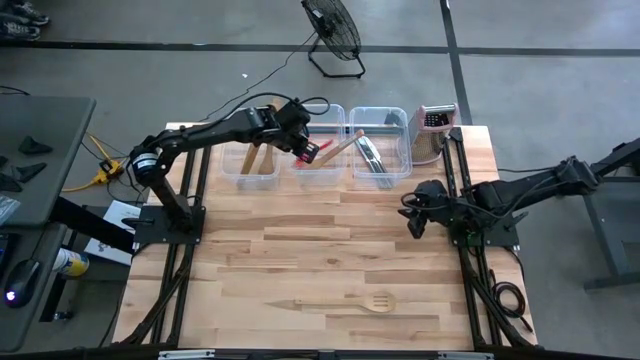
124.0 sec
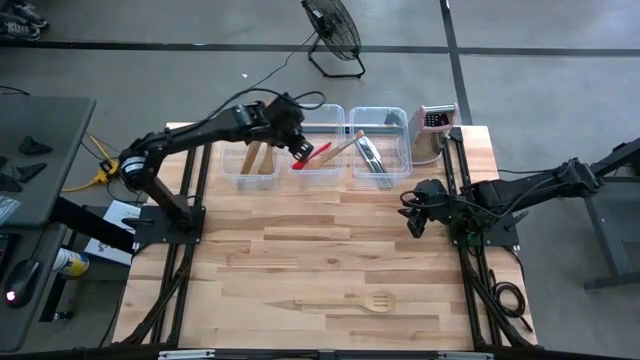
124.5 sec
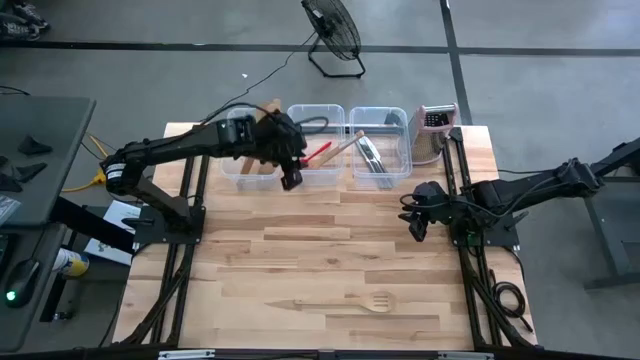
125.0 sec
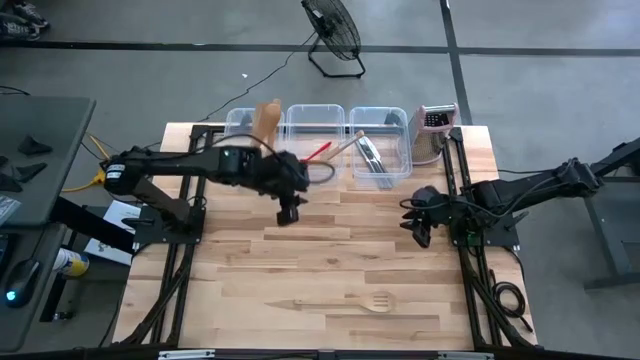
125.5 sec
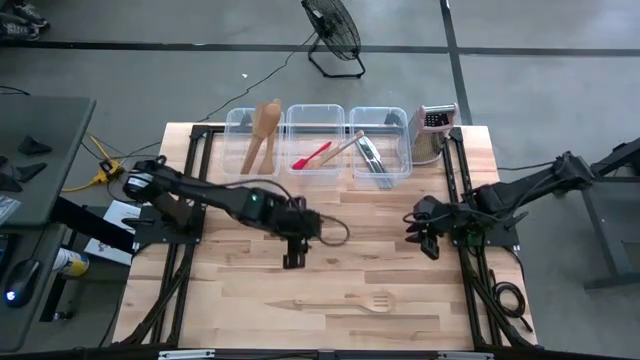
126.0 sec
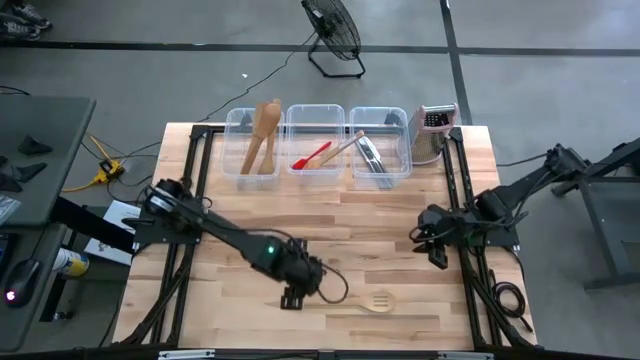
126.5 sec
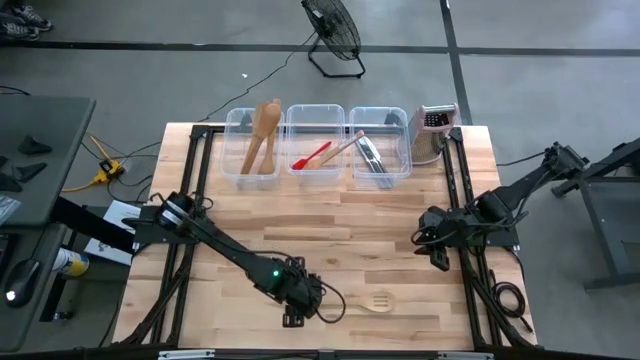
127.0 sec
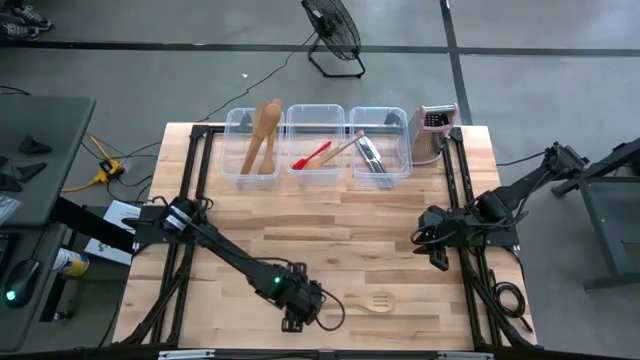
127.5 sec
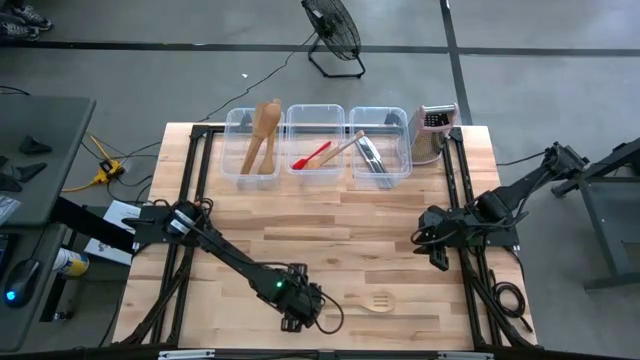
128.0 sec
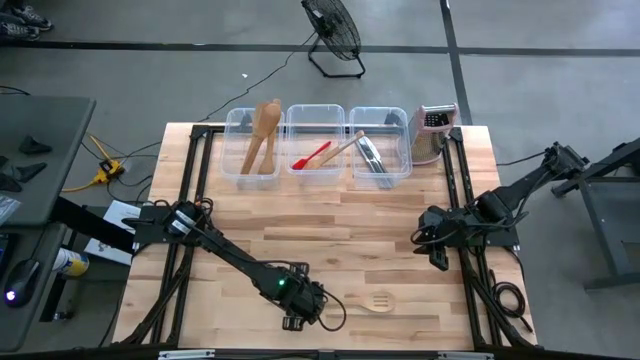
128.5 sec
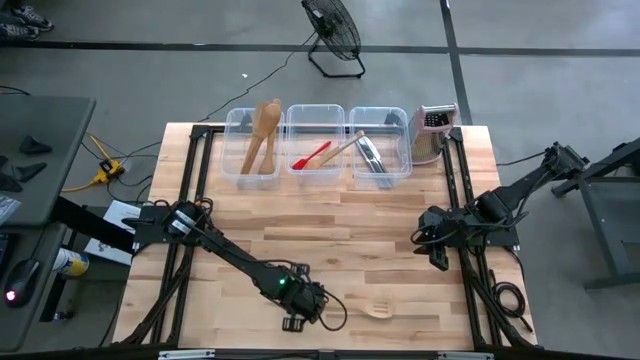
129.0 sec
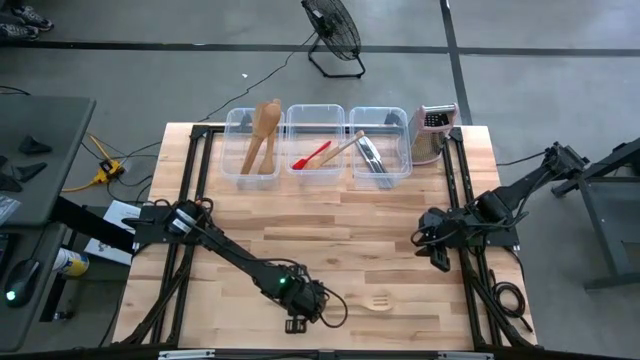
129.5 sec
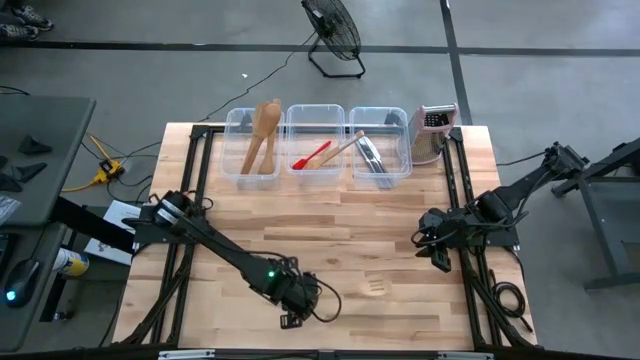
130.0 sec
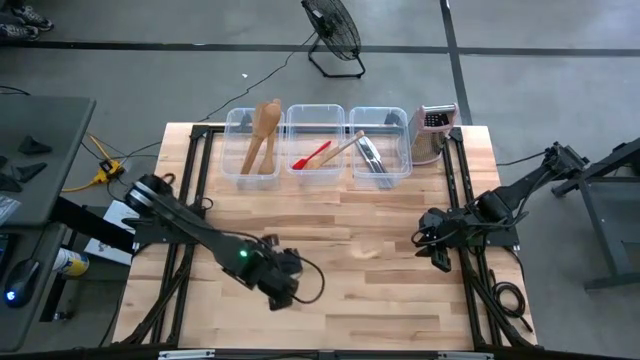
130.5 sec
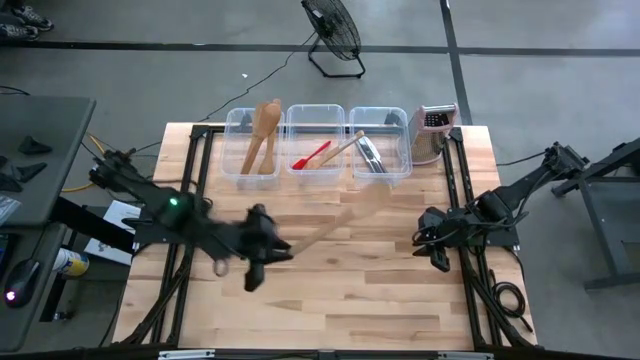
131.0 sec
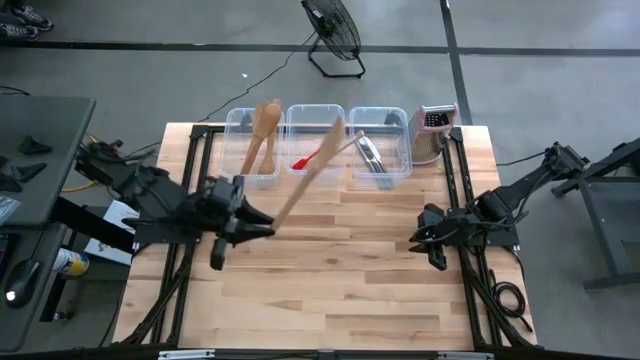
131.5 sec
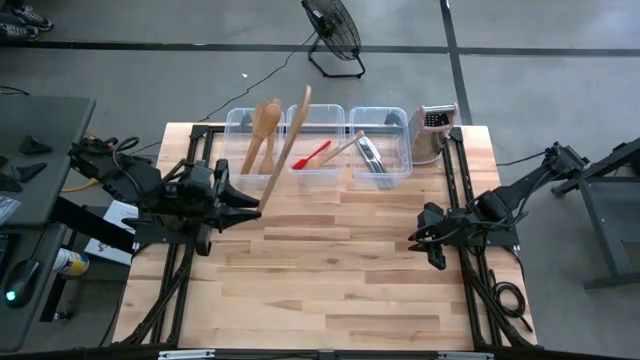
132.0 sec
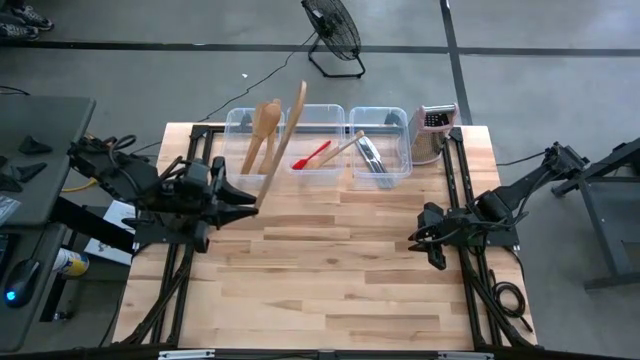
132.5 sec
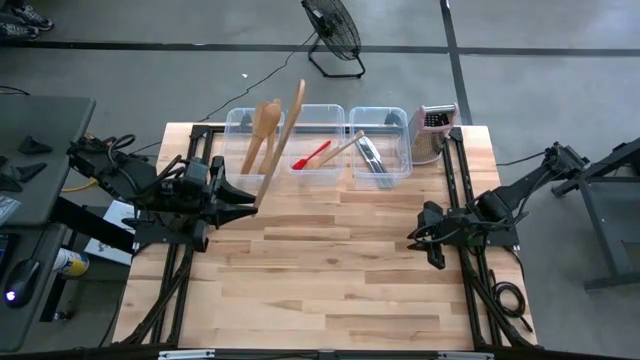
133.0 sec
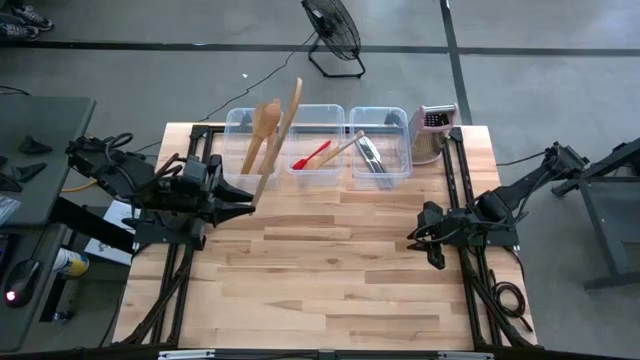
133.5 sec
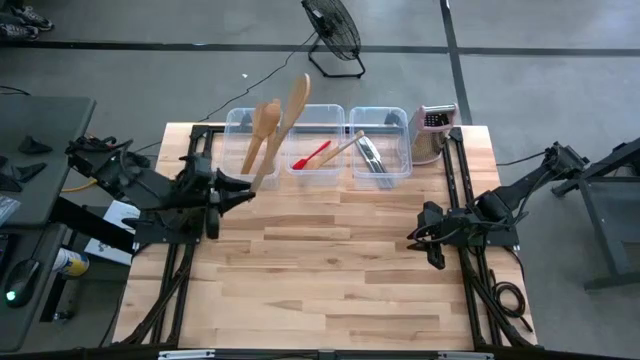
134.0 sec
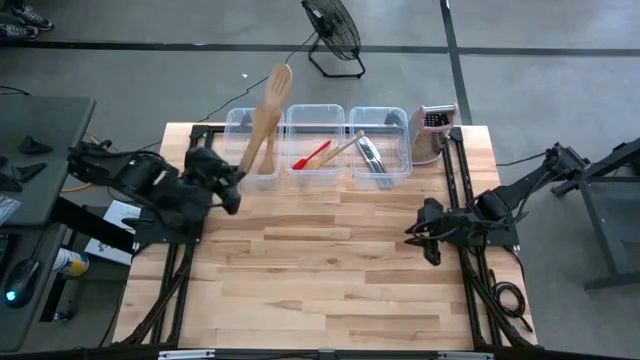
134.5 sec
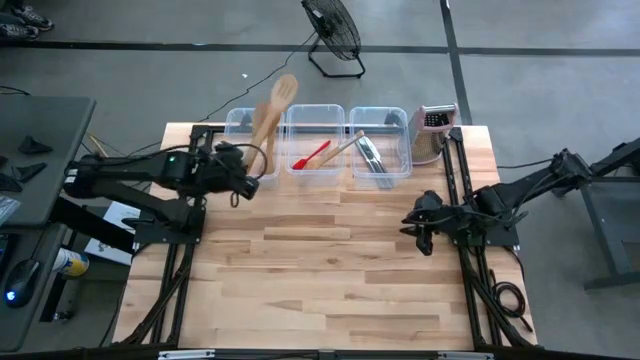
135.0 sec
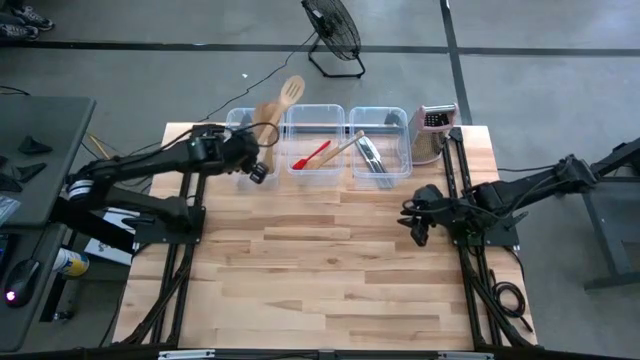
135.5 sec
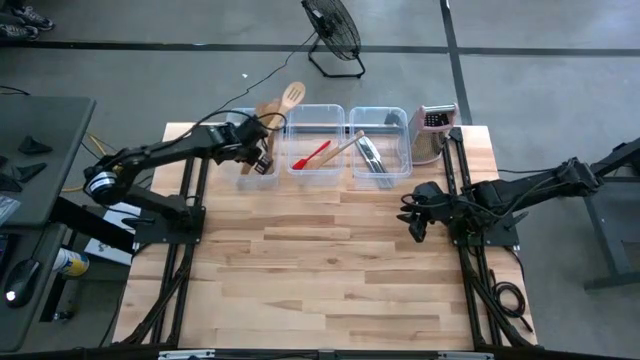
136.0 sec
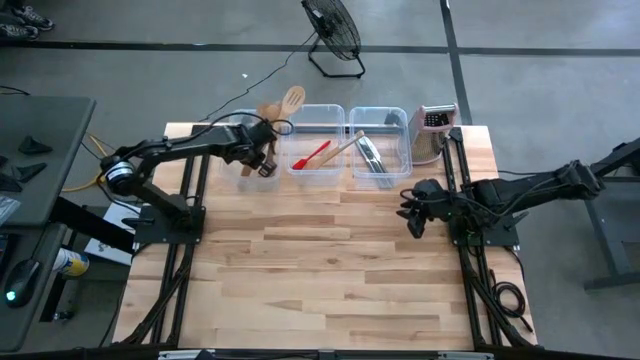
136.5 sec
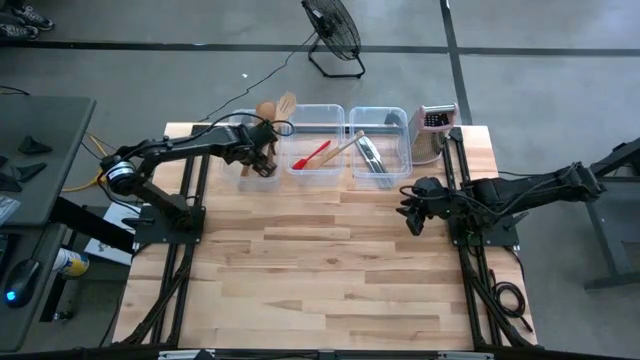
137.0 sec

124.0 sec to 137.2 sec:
Task: Pick & Place Kitchen Items
Put the slotted serving spoon into the left transparent bin

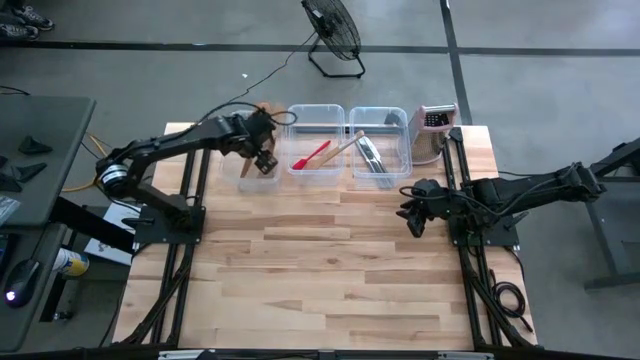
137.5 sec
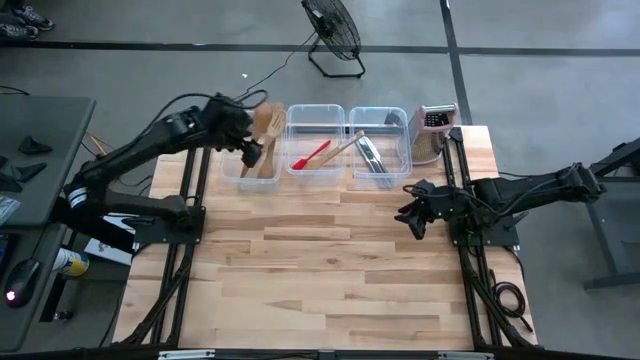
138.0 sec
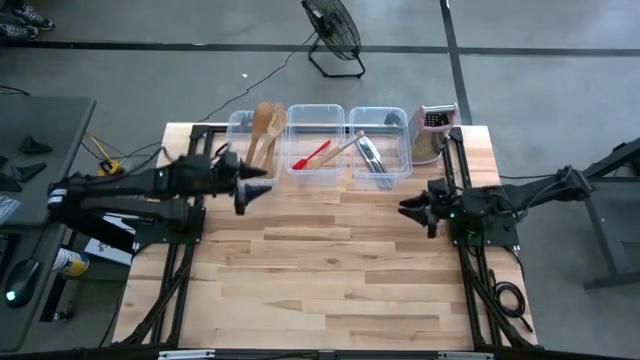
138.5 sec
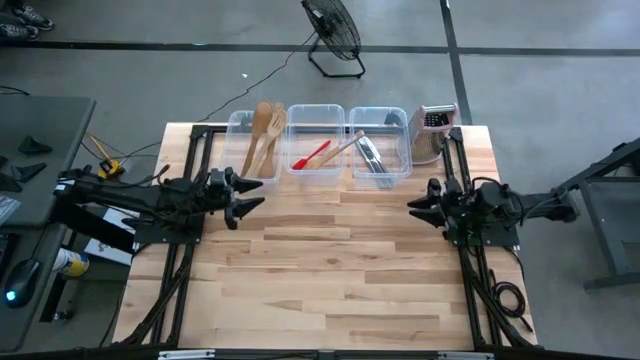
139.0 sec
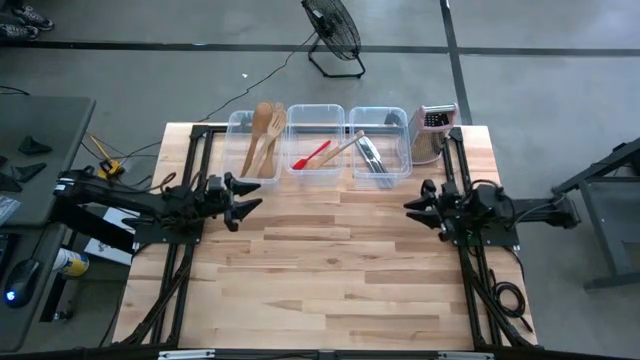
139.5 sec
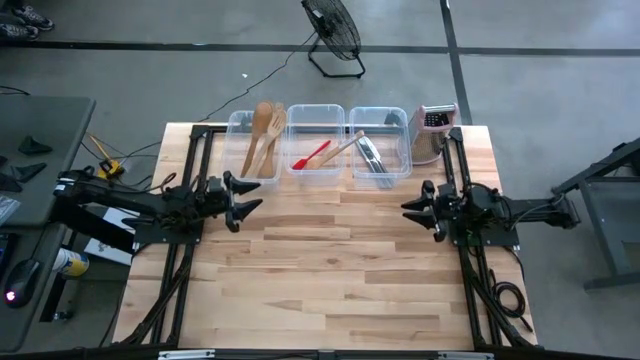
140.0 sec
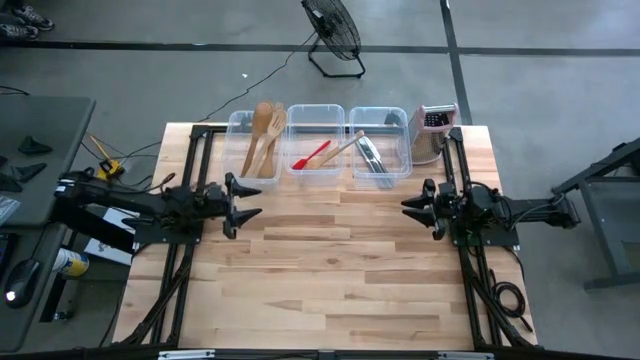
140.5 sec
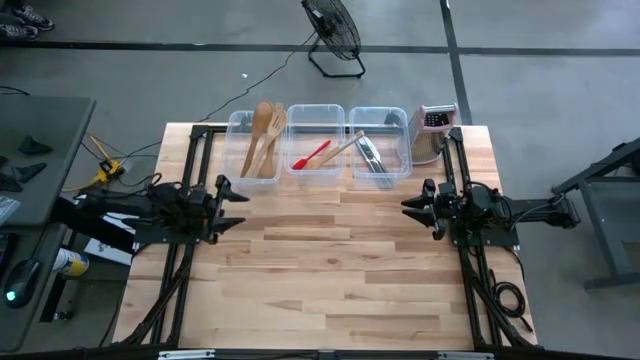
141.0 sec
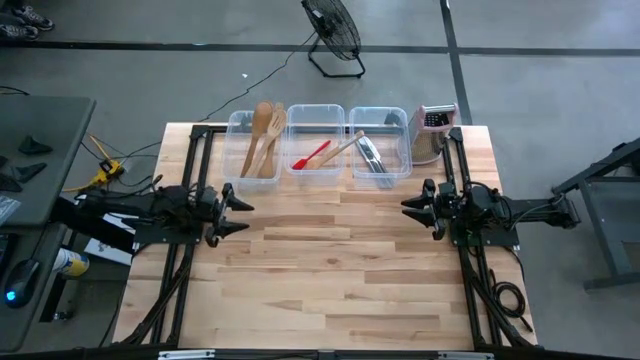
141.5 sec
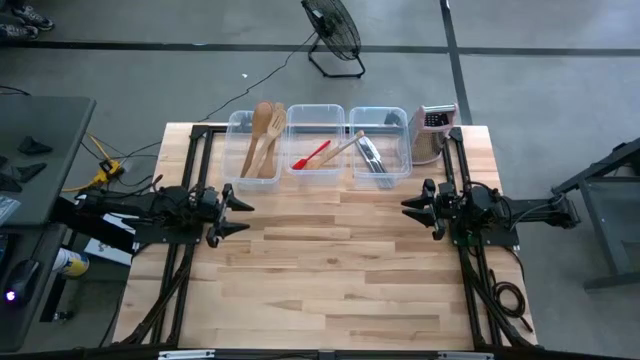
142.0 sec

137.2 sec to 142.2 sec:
Return to Home Position

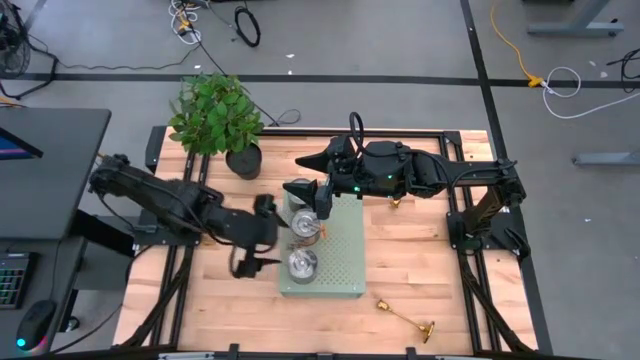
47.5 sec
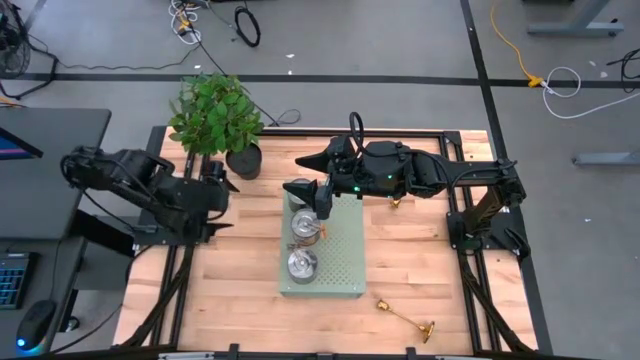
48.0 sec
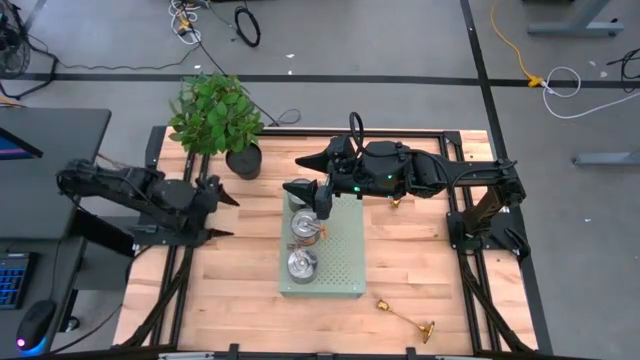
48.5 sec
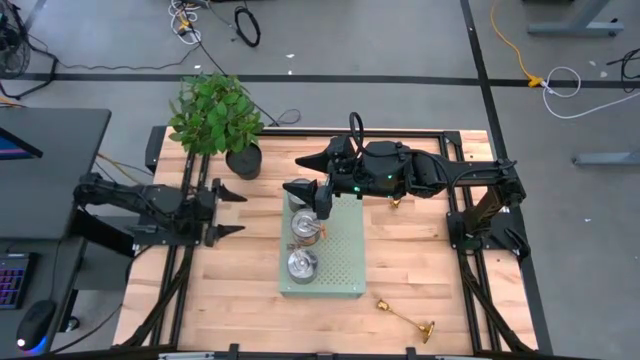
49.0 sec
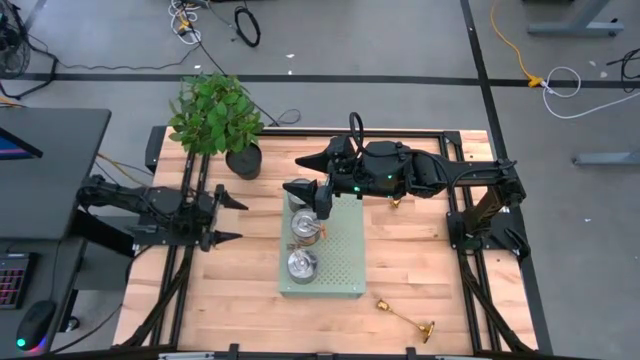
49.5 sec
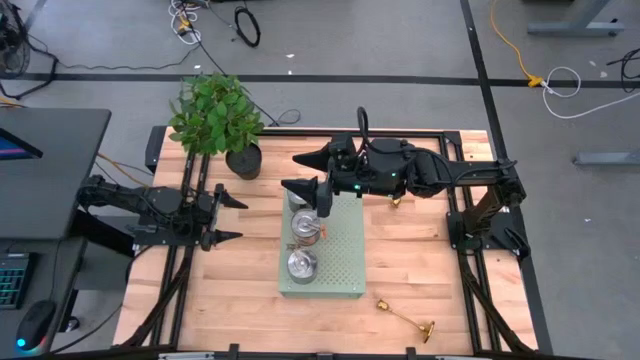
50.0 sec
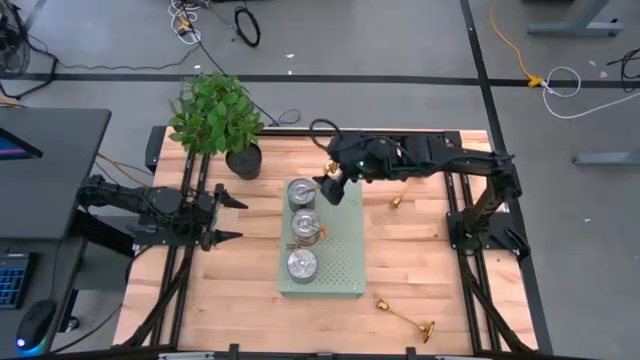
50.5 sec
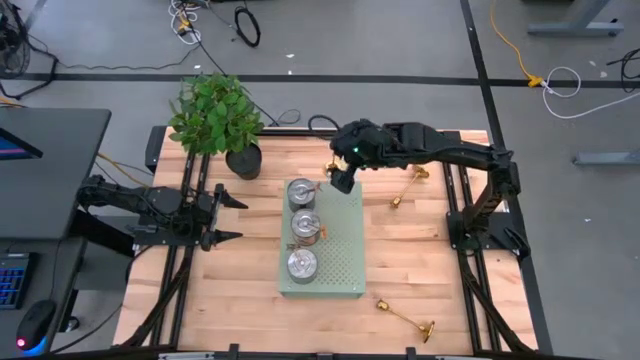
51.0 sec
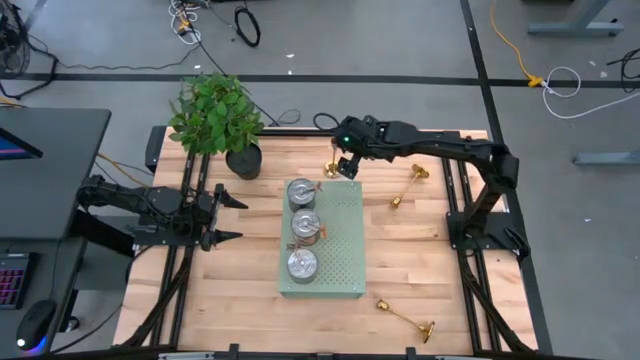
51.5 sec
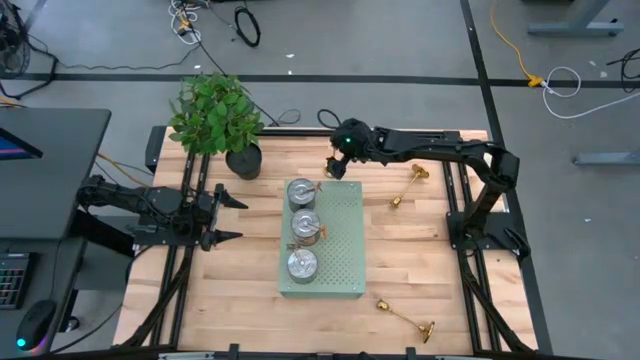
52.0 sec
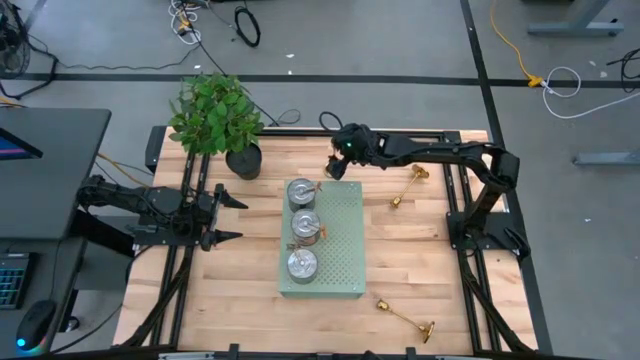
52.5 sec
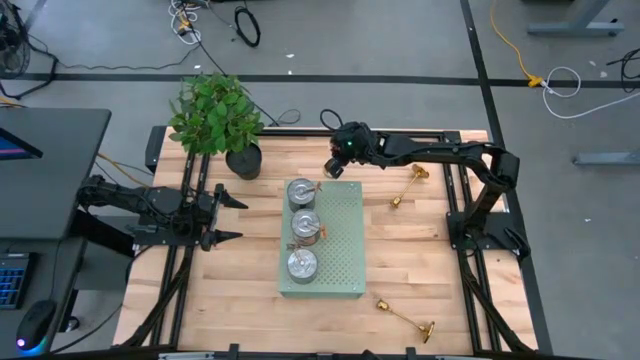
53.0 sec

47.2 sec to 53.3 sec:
Task: Pick & Place candle stick holders
Put the top left golden candle holder aligned with the orange scented candle on the shelf
